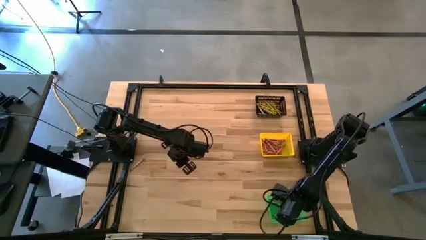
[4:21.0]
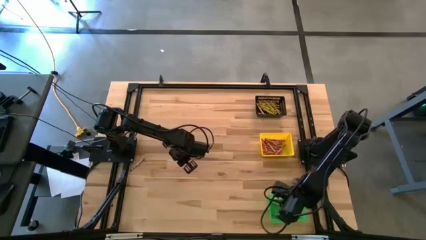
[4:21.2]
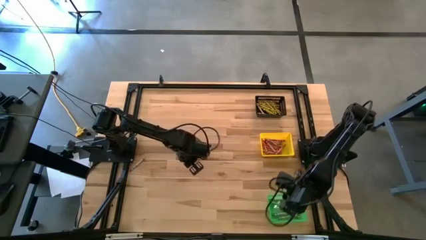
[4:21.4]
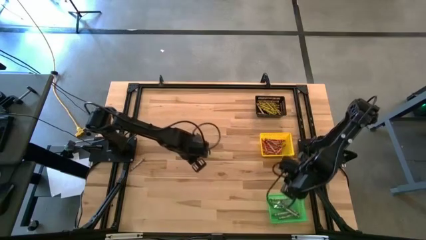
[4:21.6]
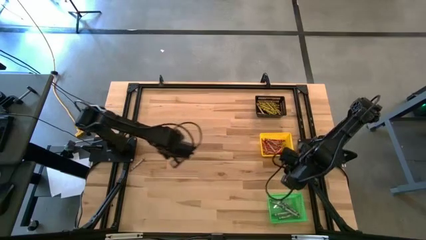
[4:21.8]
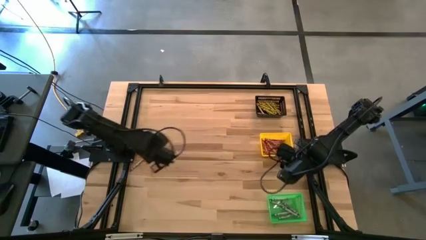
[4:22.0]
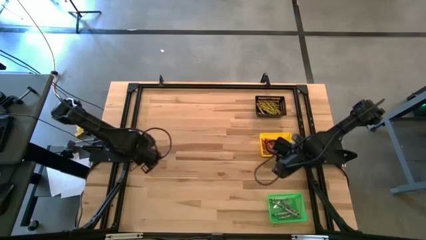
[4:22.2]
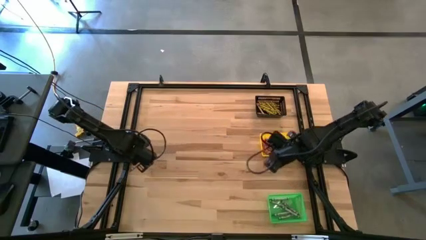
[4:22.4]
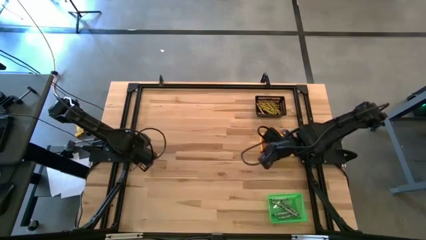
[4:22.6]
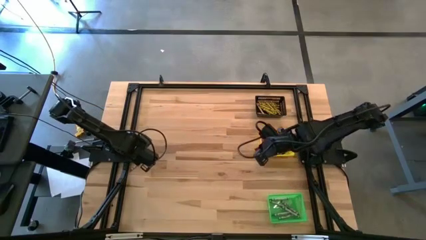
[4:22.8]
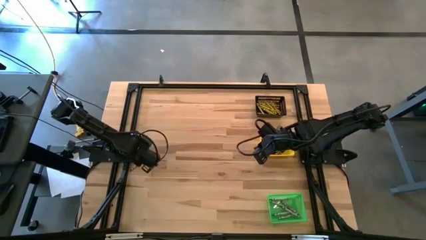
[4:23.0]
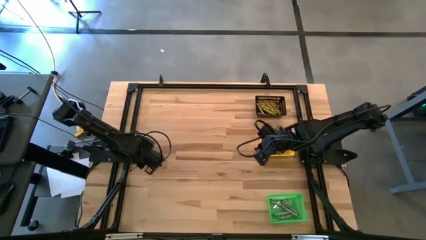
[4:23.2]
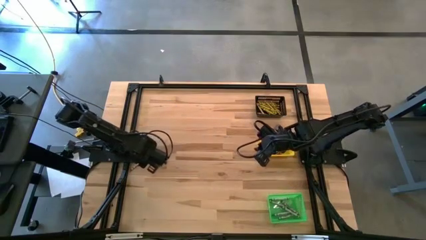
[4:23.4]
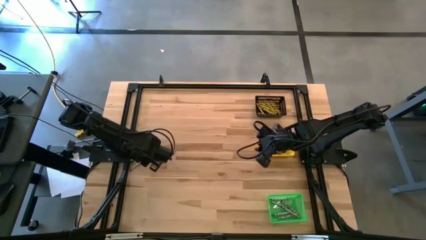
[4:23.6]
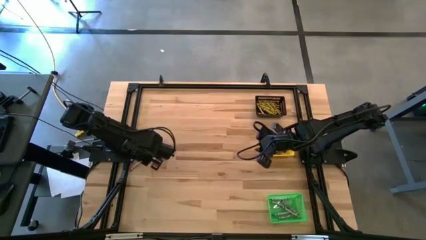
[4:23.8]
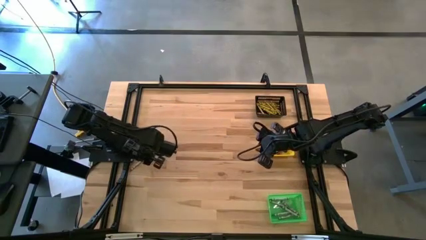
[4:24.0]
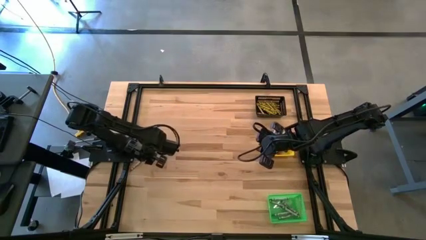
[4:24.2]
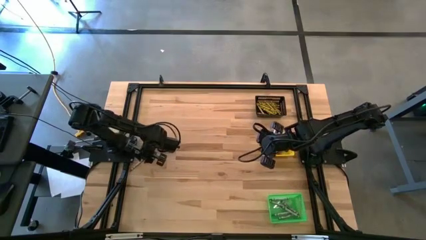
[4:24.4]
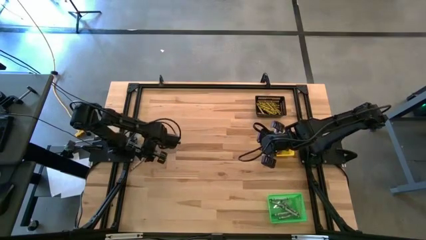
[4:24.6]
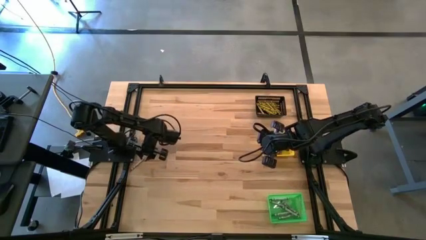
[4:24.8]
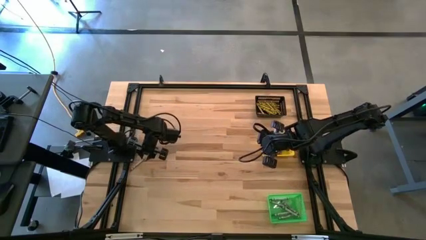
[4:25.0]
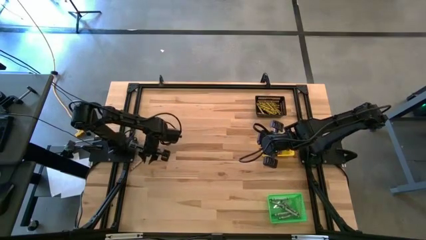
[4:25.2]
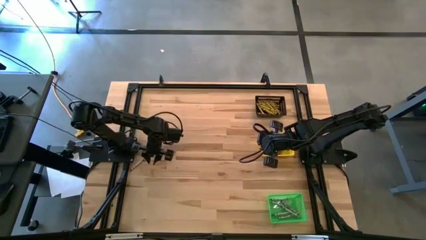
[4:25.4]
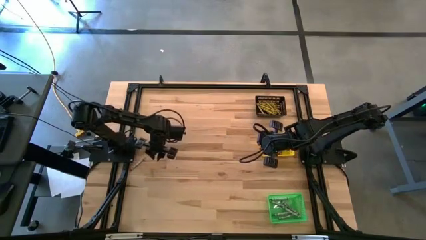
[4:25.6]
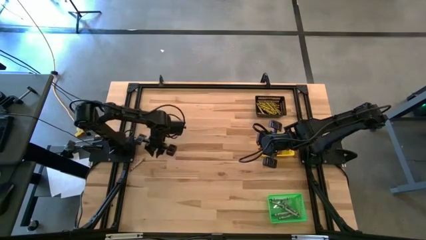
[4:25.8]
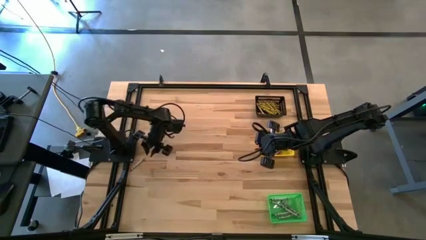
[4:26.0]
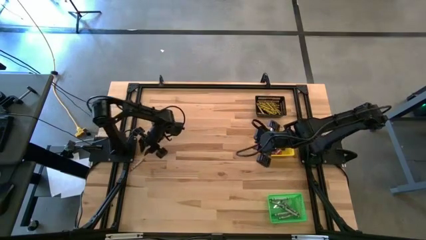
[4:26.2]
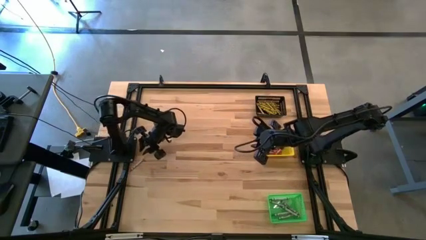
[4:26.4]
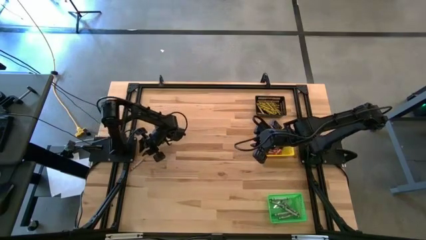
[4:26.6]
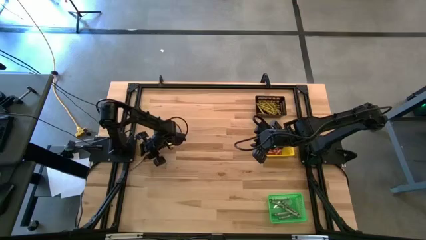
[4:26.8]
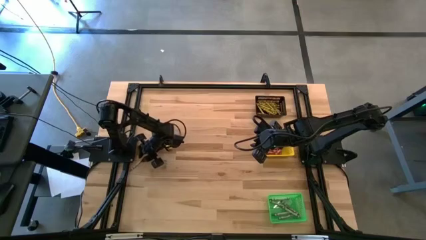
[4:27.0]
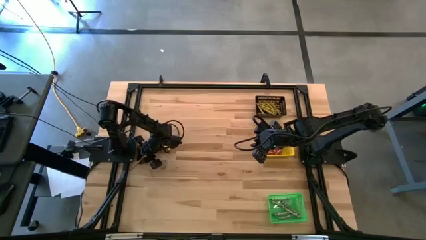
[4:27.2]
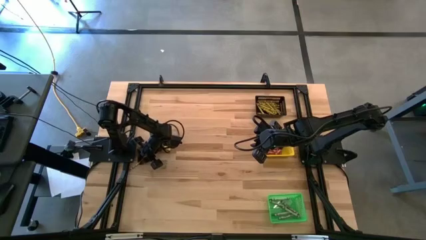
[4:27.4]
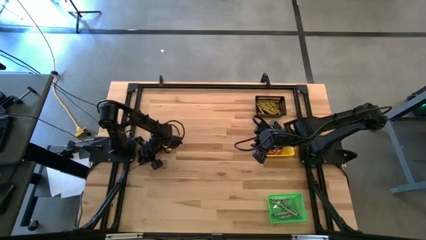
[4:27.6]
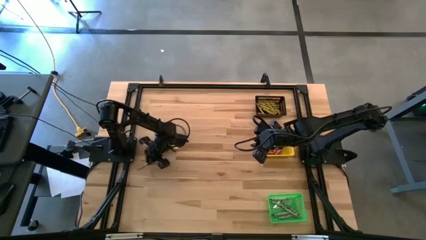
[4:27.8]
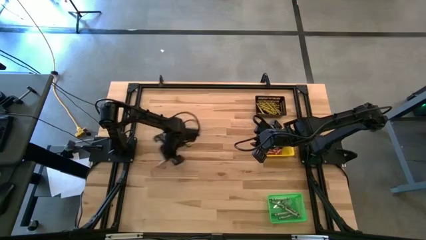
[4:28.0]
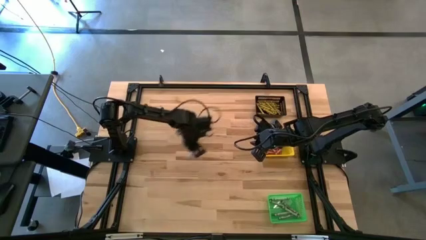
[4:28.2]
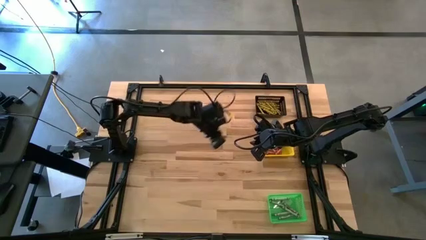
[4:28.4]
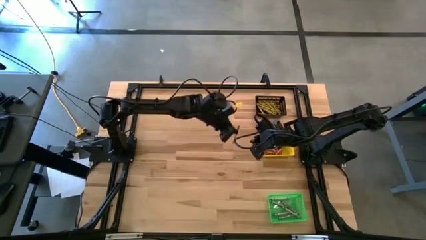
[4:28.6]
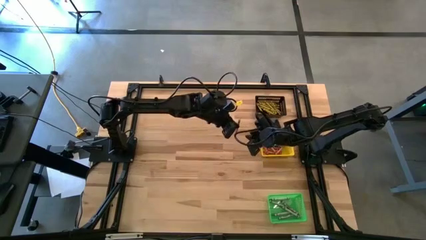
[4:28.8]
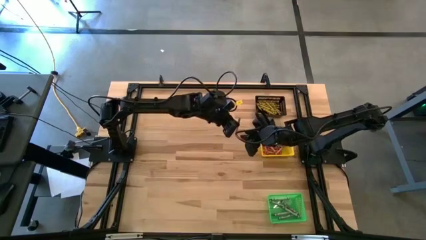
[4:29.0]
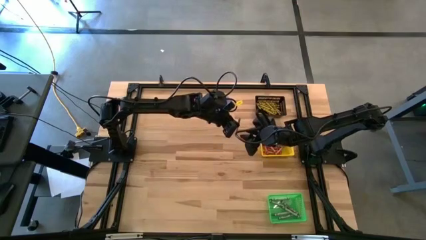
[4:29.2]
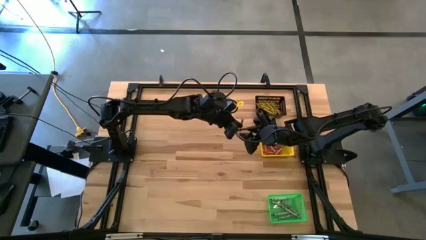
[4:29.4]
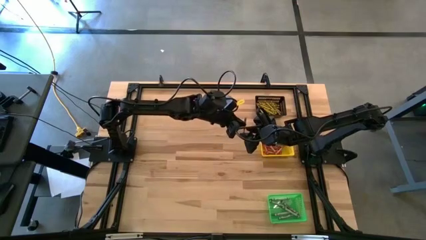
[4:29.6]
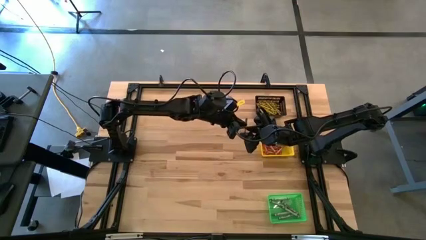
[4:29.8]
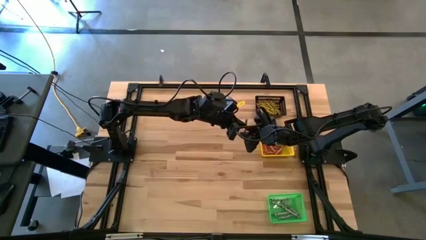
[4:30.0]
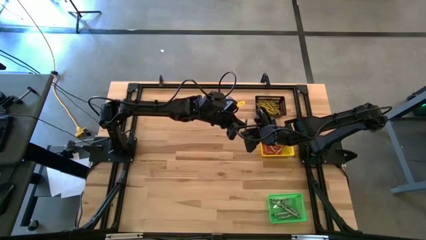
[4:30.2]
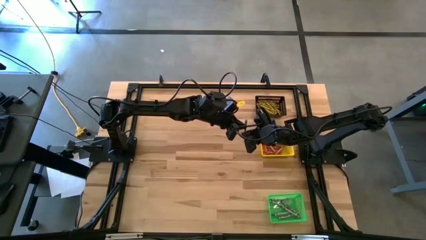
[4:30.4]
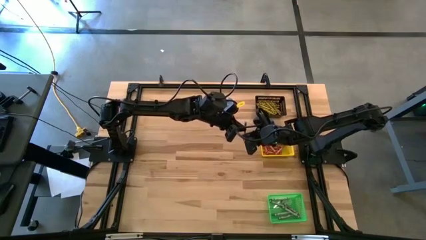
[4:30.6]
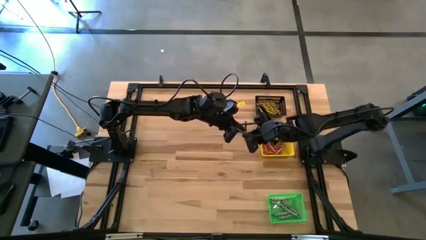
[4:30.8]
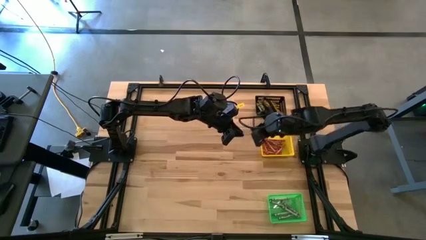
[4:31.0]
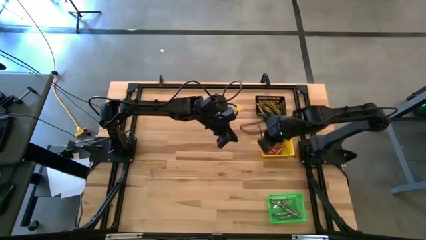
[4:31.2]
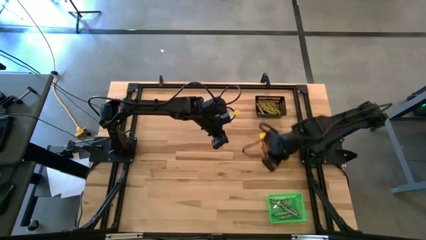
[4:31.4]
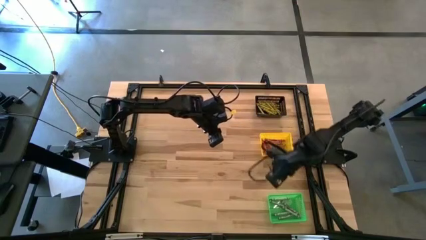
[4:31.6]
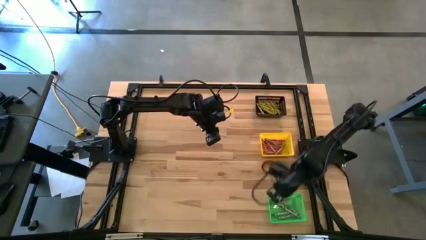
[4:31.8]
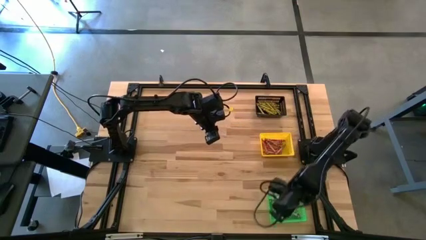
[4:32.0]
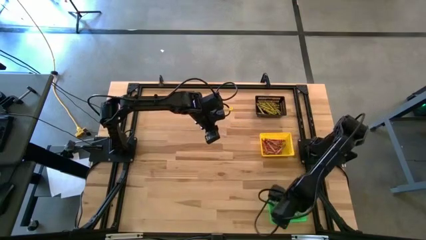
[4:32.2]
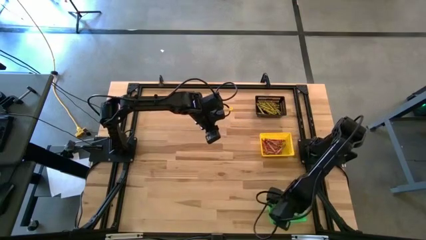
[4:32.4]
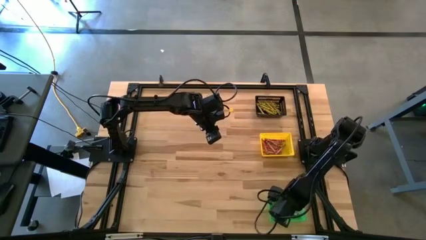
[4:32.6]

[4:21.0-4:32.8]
Task: Sort crayons
Put the gray crayon into the green bin

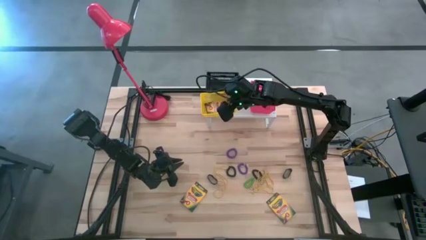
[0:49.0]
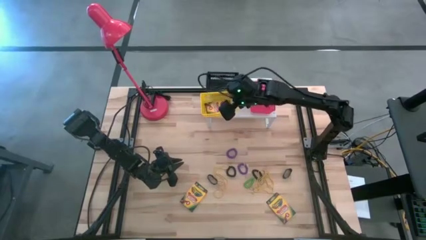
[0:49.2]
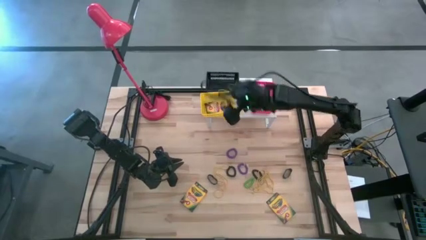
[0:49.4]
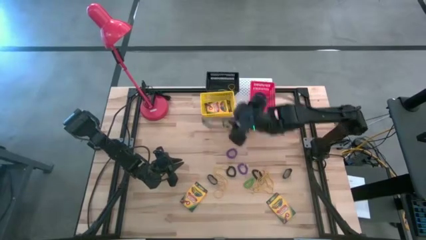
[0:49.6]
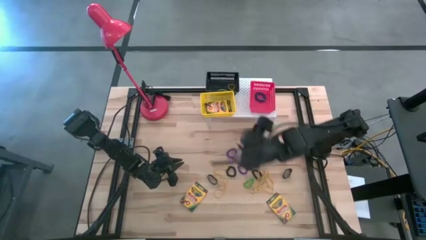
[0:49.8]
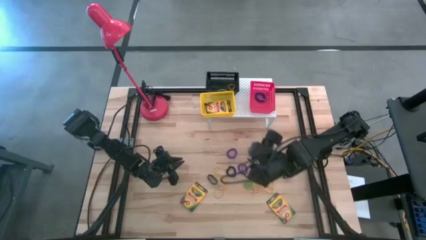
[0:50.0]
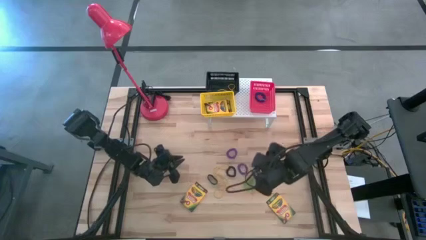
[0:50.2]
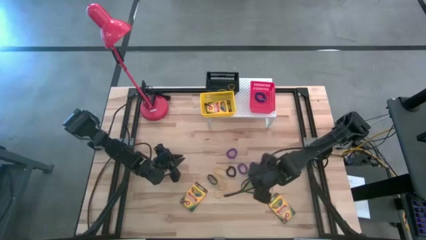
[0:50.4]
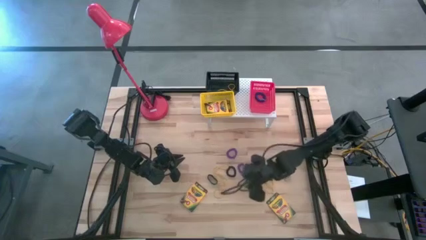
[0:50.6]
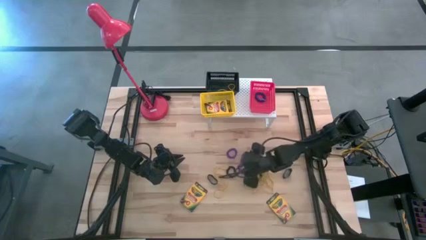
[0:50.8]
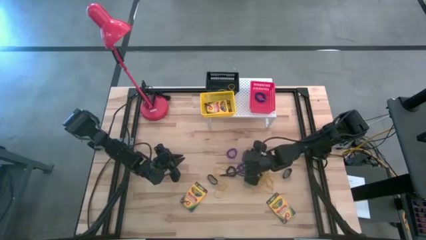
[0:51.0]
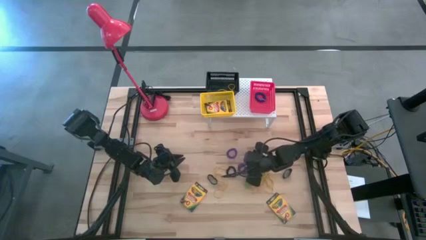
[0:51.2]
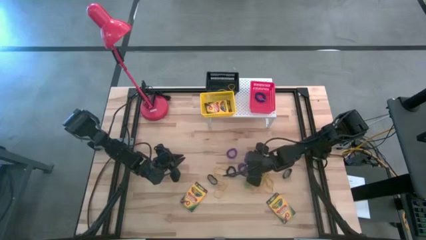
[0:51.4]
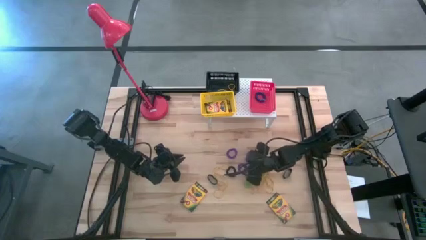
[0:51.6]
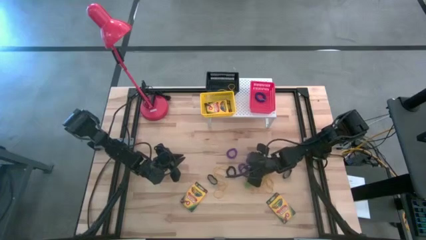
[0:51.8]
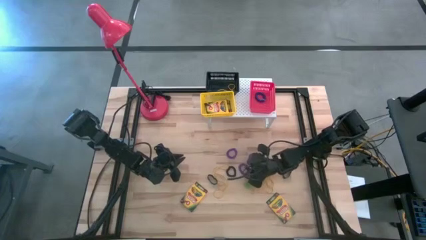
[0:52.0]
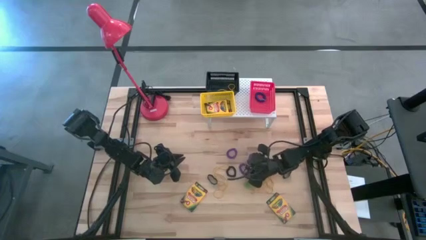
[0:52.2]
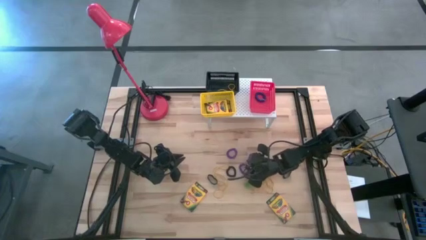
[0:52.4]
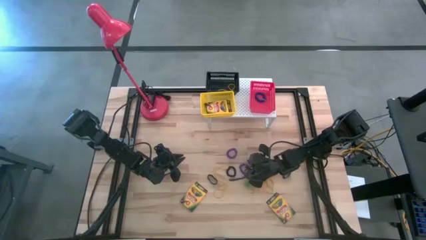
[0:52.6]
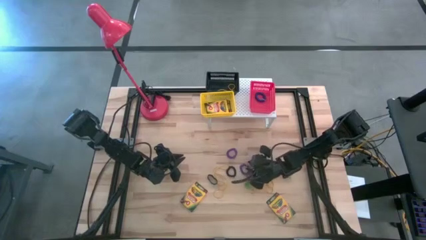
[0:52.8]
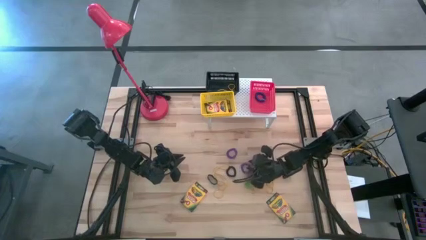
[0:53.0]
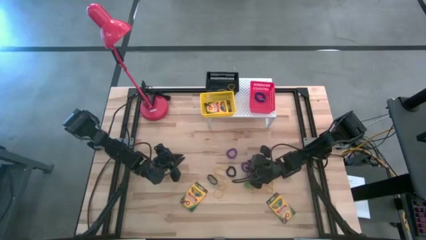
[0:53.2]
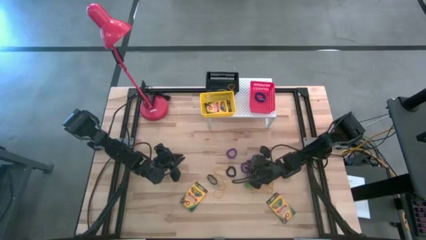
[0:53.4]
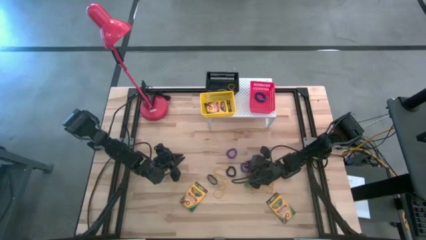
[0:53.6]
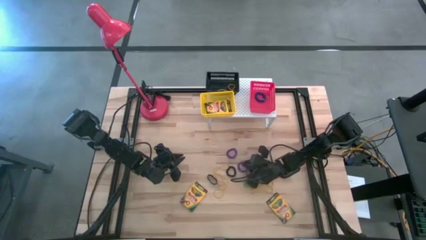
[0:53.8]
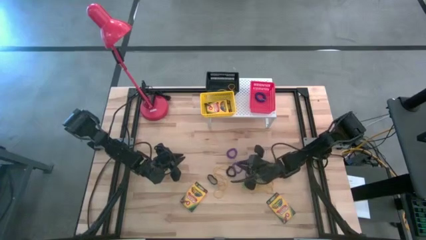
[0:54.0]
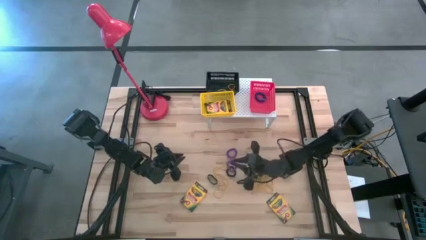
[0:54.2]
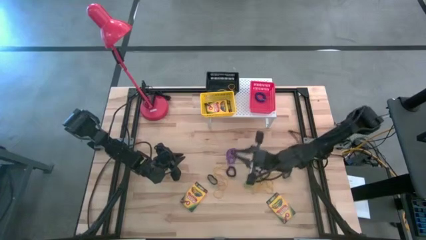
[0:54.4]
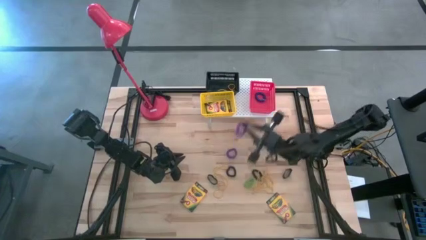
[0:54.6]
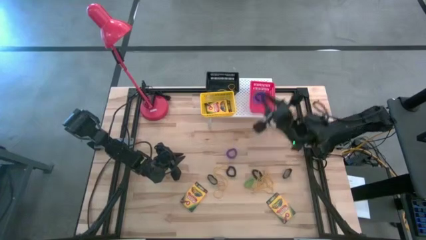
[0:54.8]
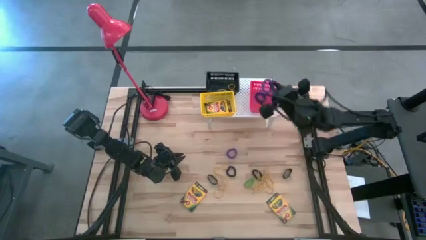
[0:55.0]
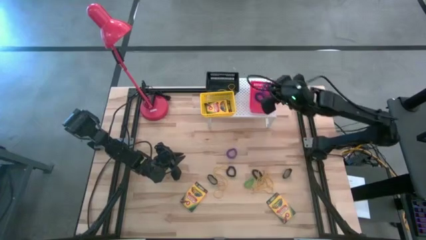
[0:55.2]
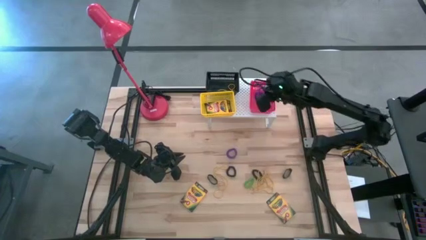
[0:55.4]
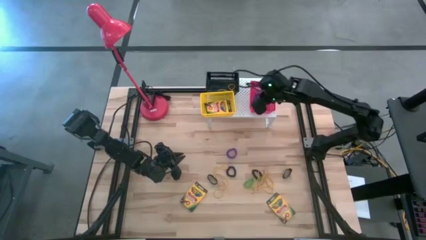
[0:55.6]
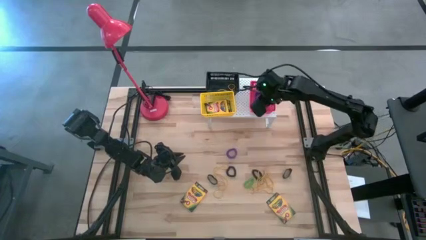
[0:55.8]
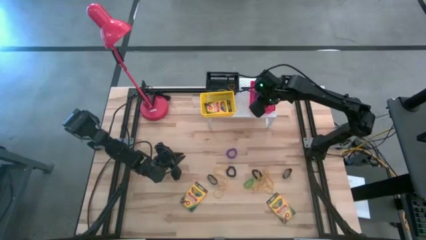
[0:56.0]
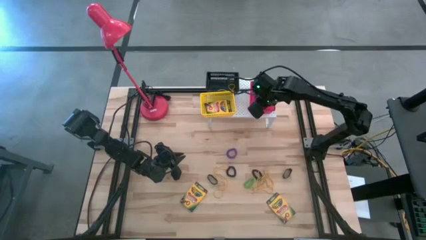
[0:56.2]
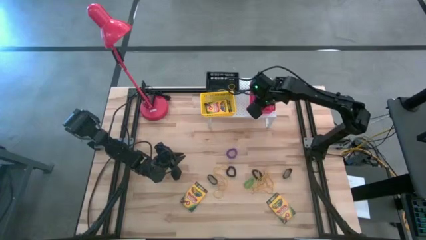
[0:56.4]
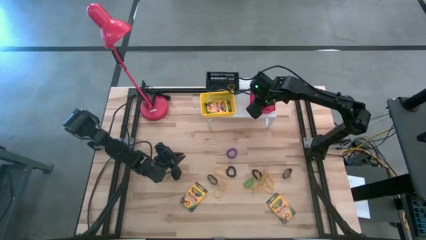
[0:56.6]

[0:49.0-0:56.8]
Task: Pick & Place Office Desk Supplies
Put the purple spring keychain into the red bin on the shelf
